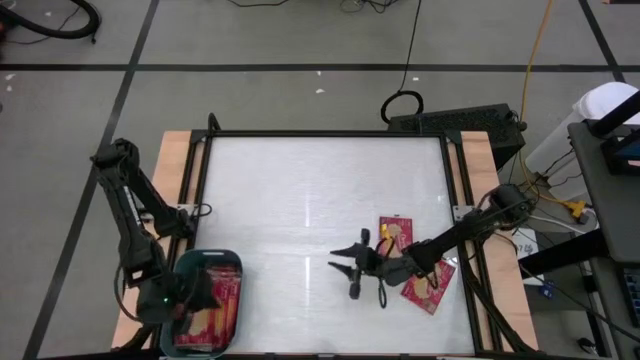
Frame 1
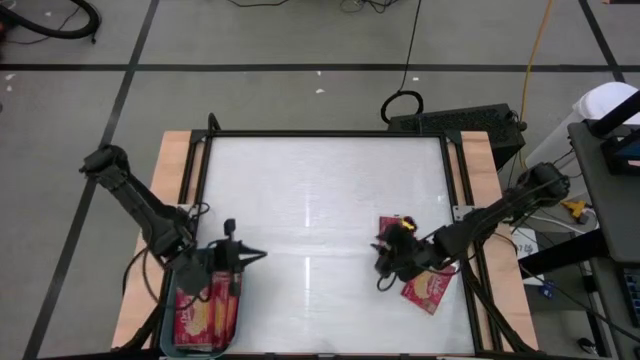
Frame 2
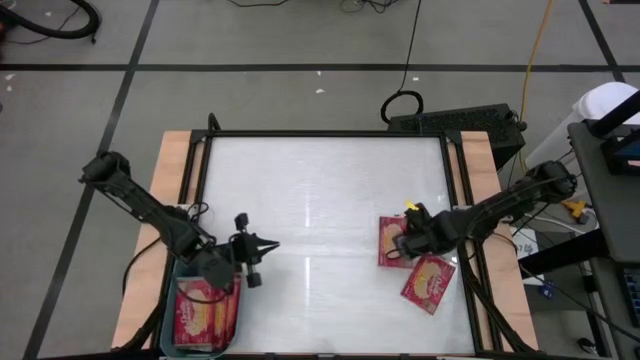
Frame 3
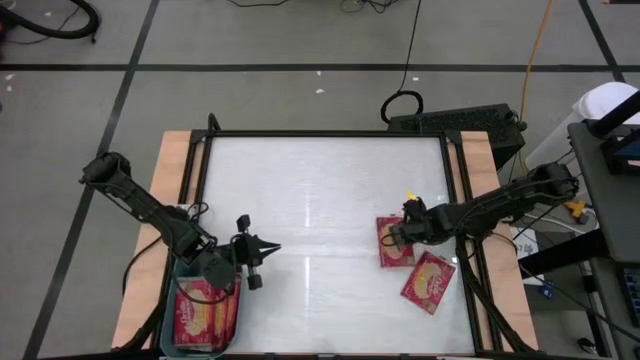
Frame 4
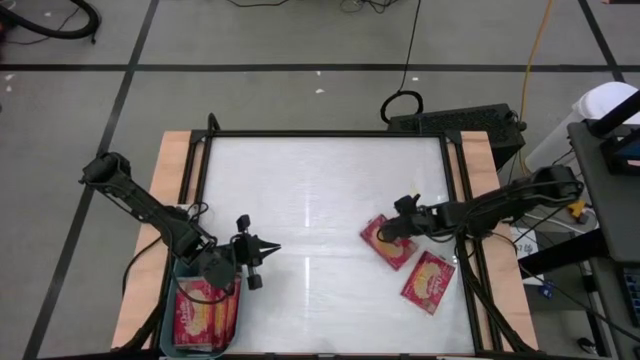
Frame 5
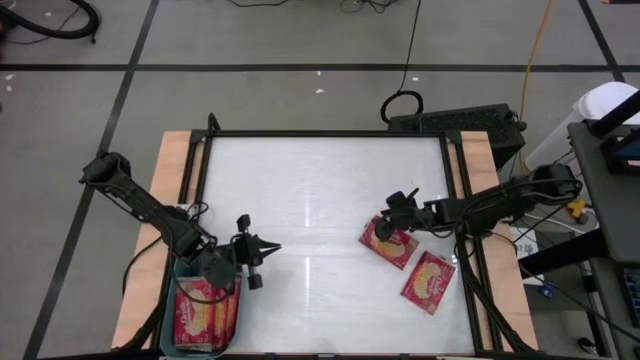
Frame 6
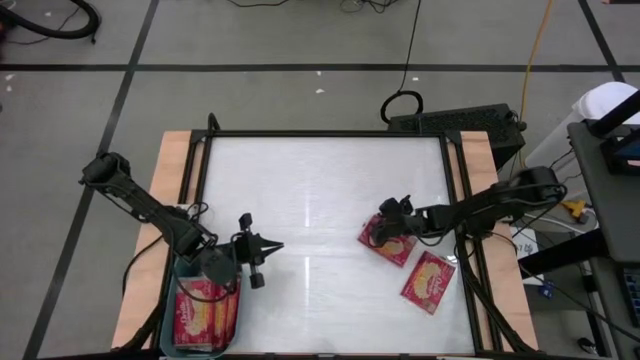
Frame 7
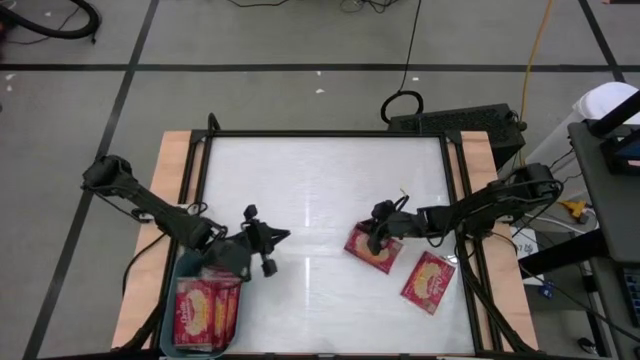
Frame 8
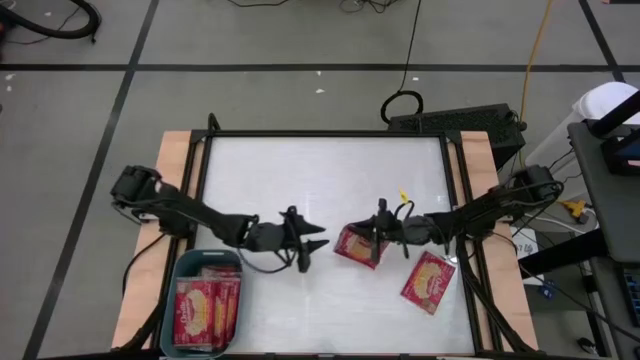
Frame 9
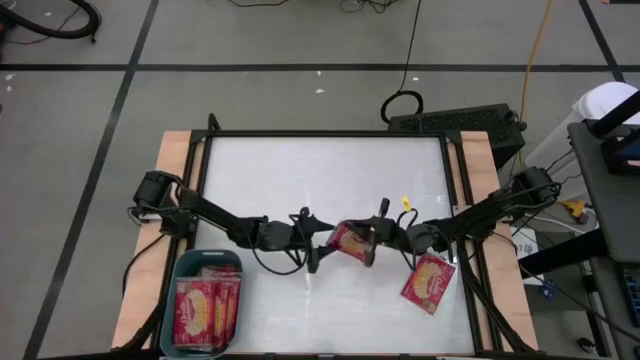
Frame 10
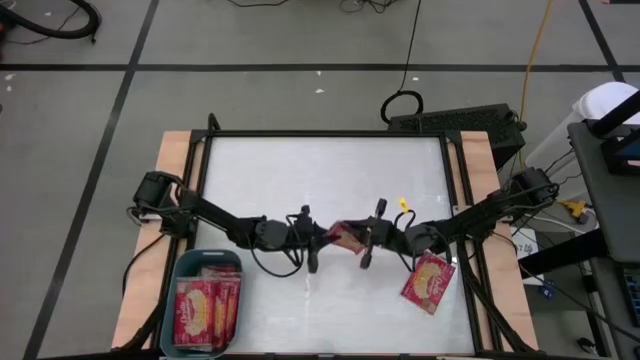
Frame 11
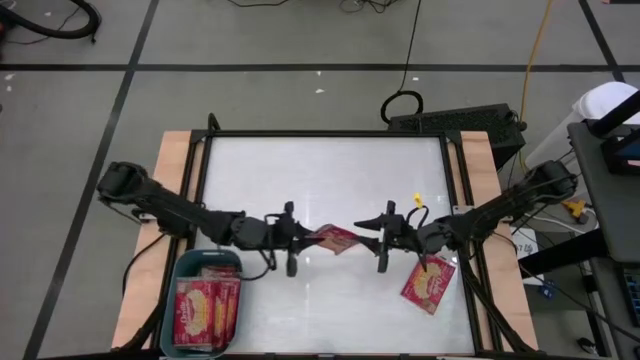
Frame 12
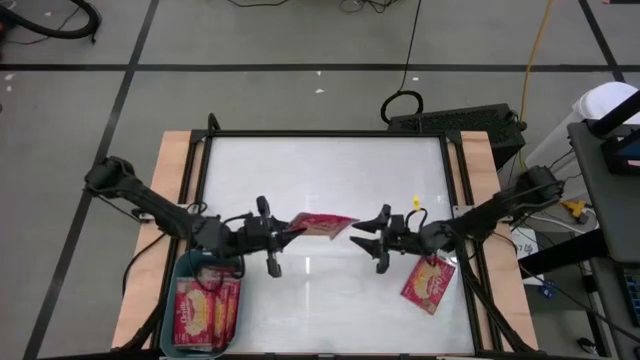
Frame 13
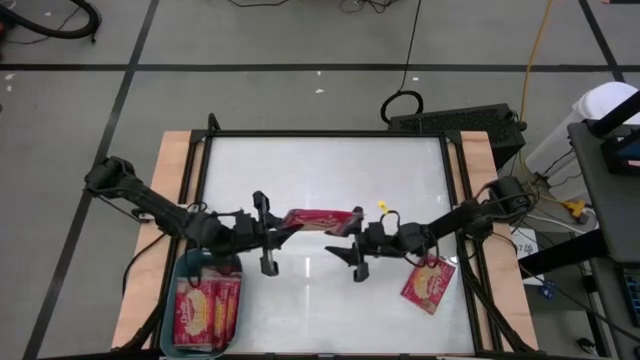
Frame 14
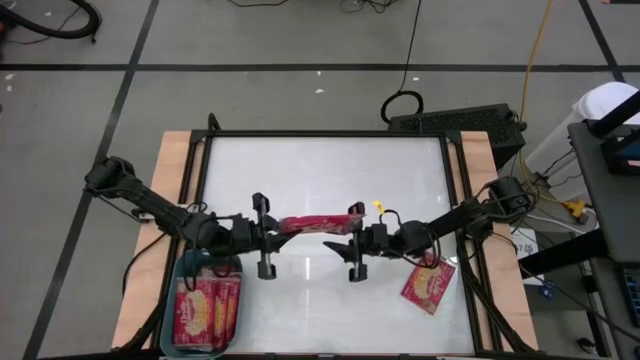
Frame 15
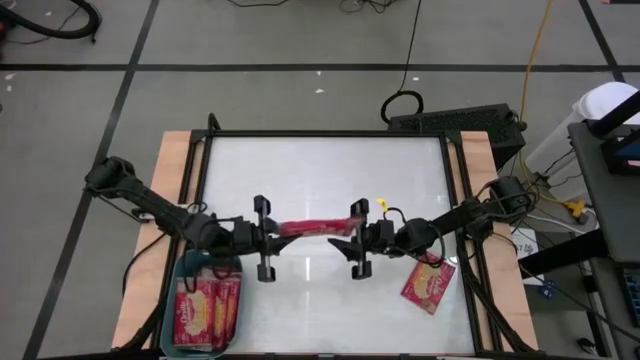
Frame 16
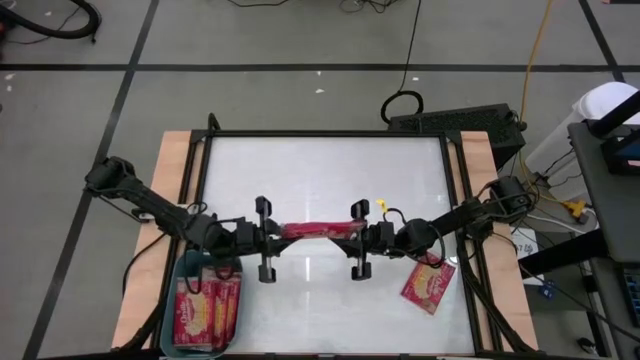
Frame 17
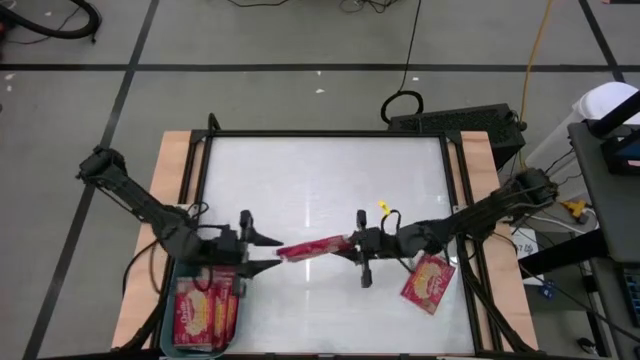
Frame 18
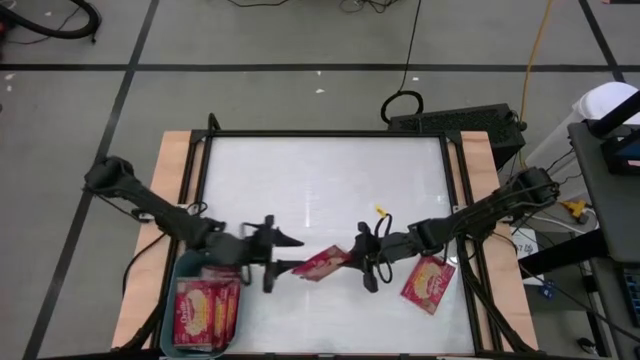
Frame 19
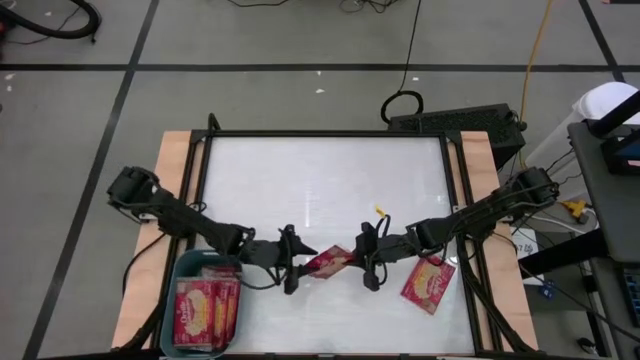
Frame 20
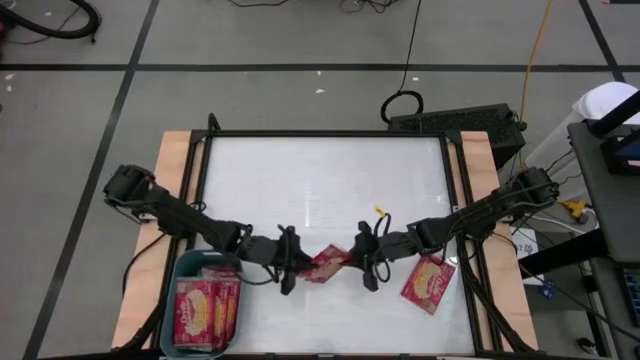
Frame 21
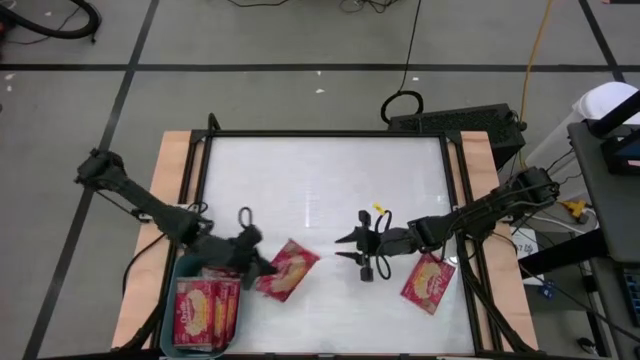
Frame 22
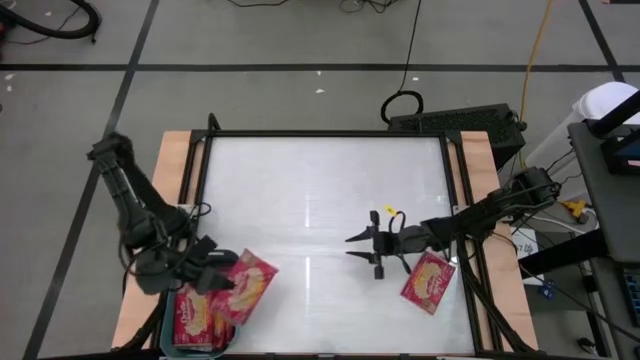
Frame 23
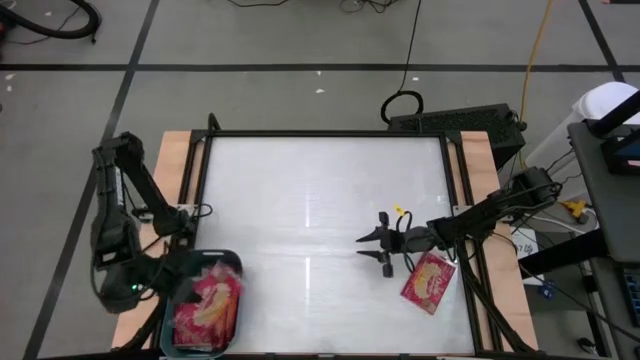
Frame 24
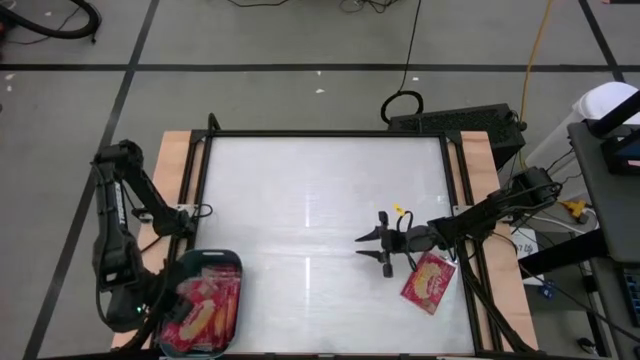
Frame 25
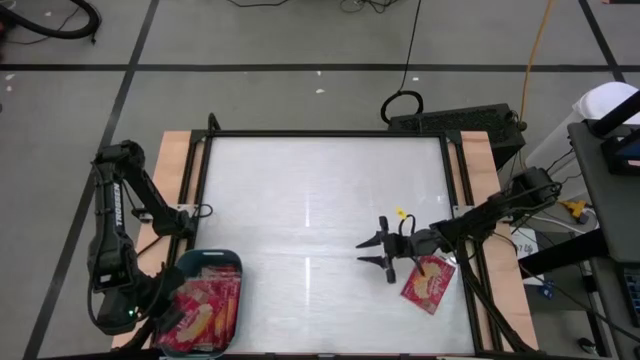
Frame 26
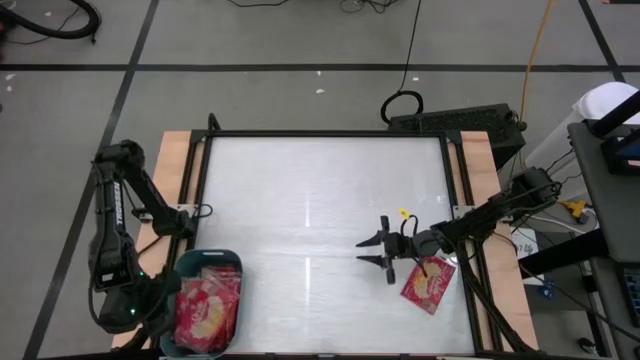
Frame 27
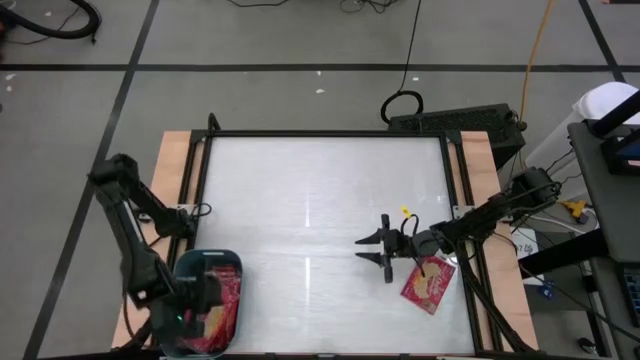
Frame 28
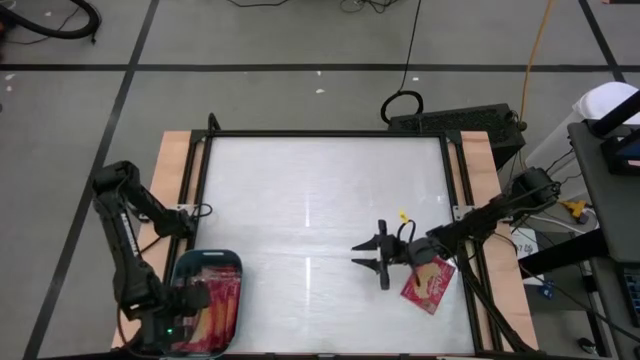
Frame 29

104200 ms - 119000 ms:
Task: Sort popcorn bags into baskets
Put the red popcorn bag into the blue bin

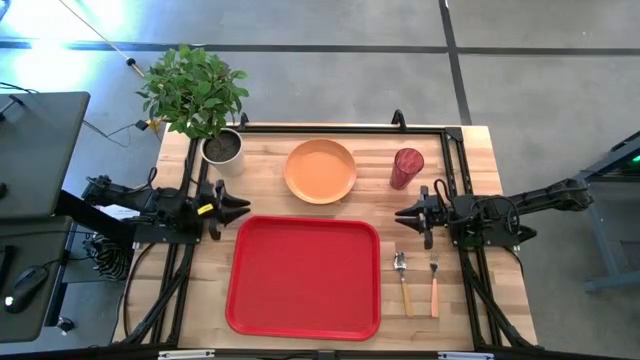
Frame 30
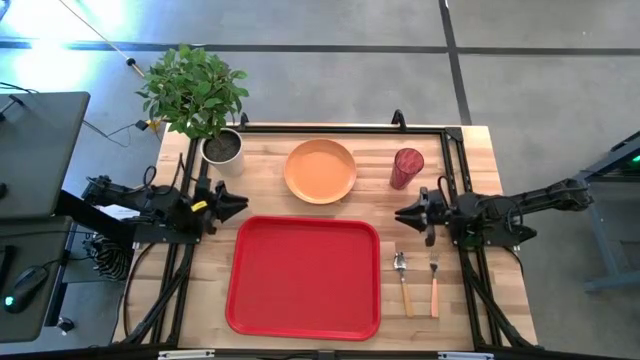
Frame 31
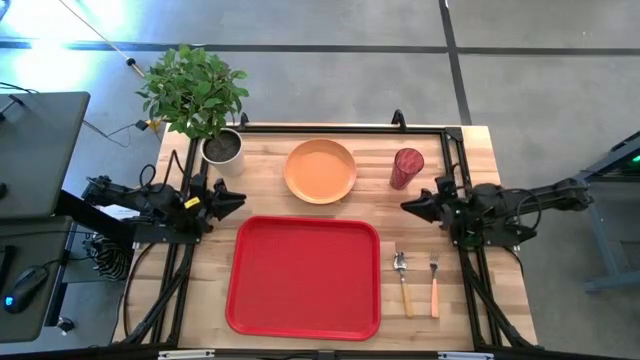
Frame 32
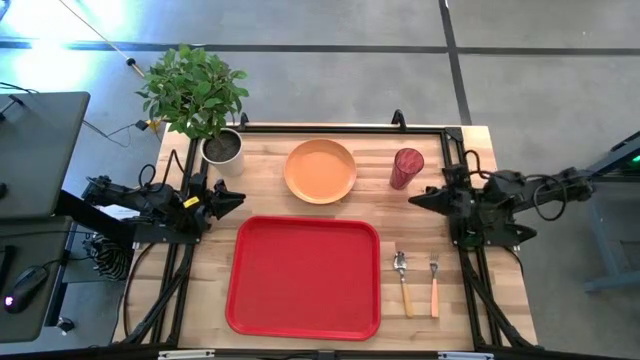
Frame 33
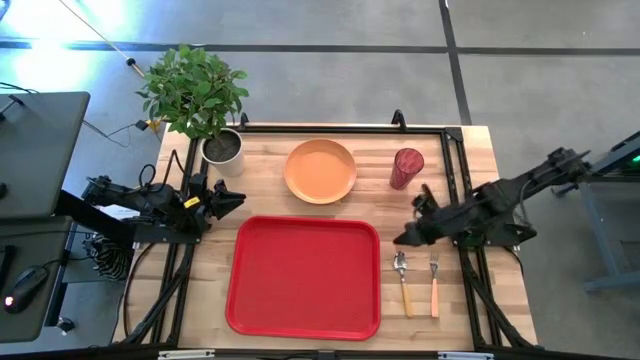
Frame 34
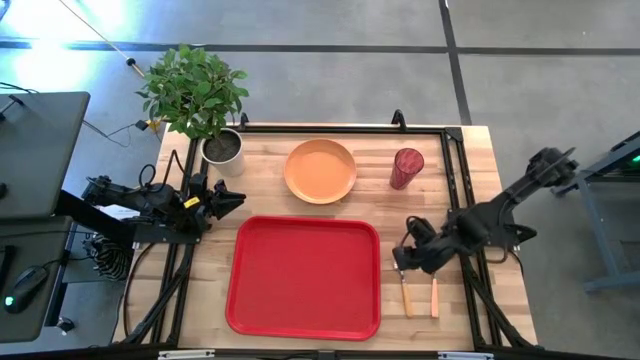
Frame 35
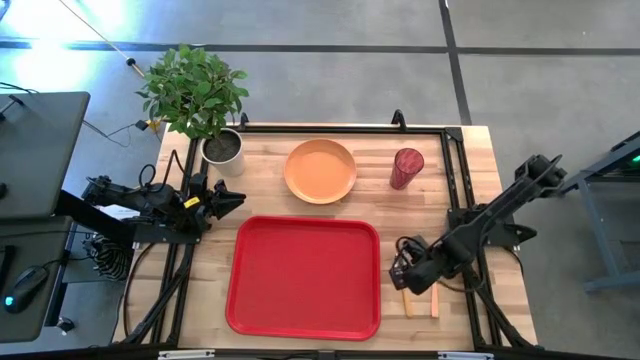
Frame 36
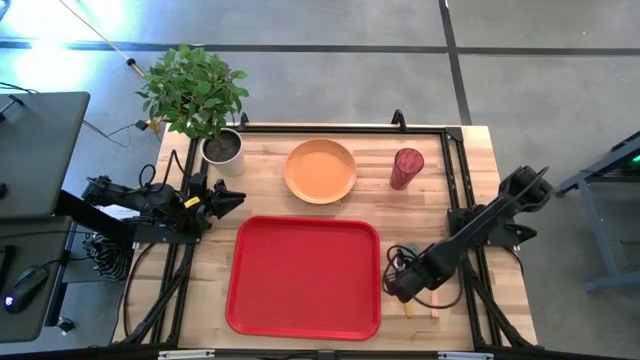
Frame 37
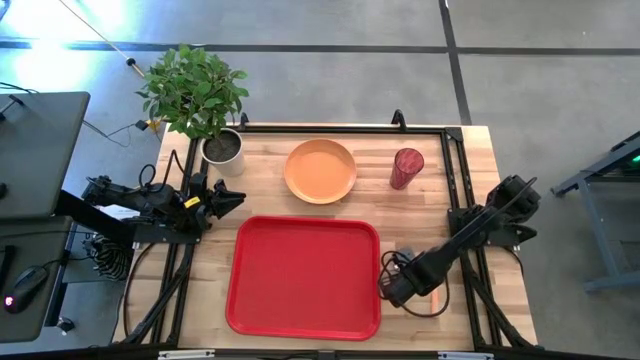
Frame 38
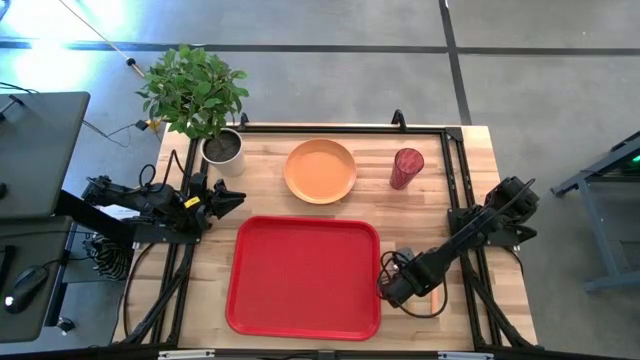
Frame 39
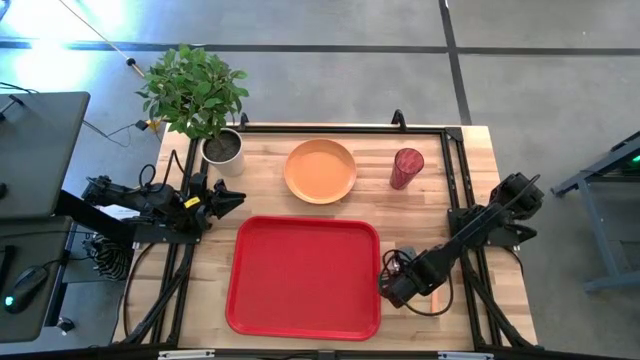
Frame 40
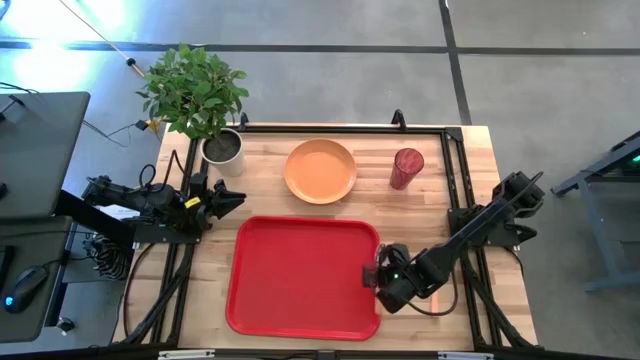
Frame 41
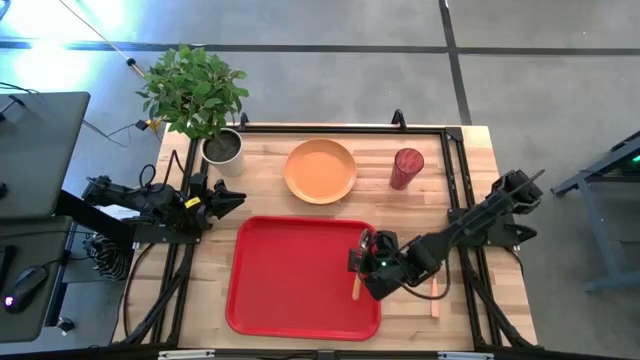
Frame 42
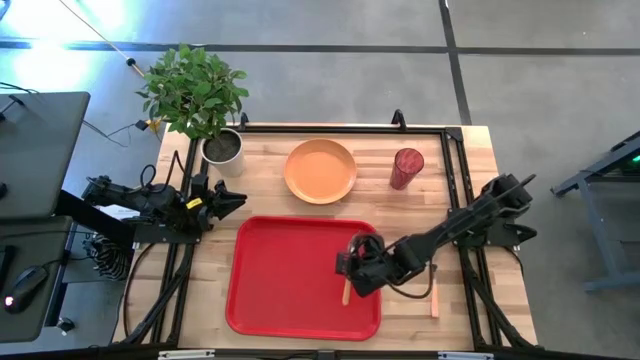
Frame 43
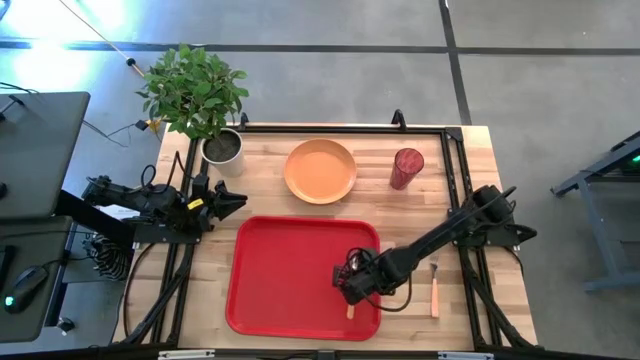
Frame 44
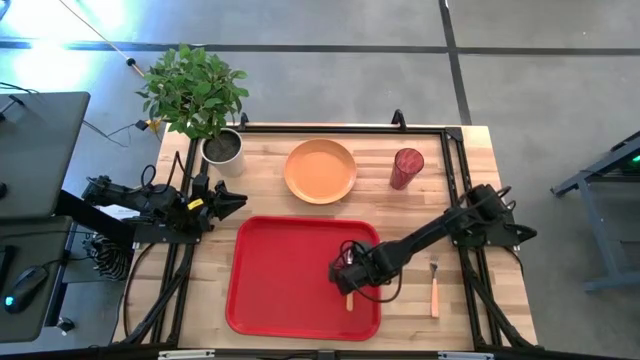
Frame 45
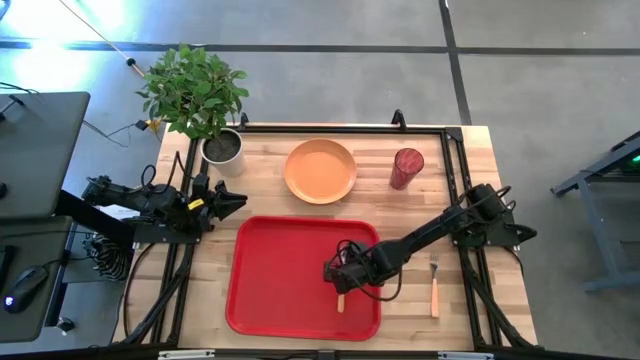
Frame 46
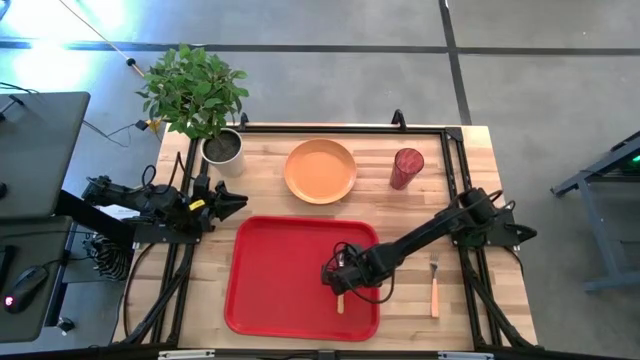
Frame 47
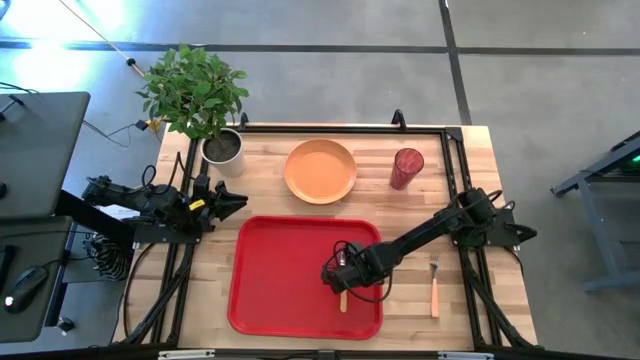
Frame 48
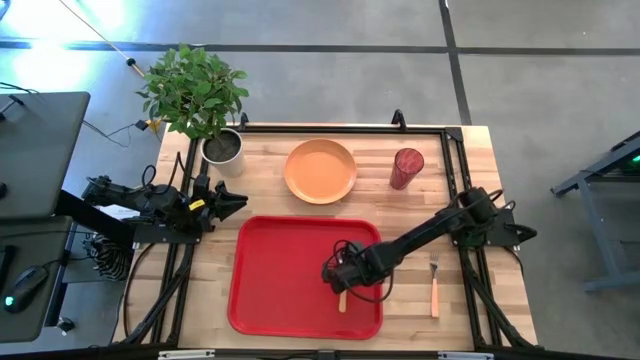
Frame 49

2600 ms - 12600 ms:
Task: Pick and place plate/cup/fork/spoon on tray
Put the yellow spoon to the right on the orange tray
